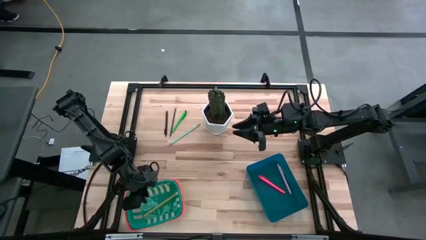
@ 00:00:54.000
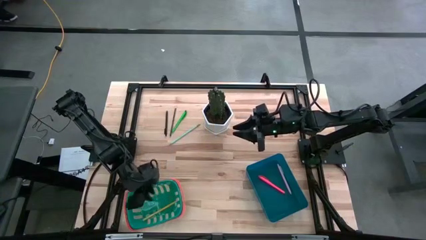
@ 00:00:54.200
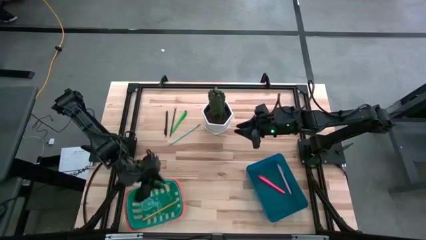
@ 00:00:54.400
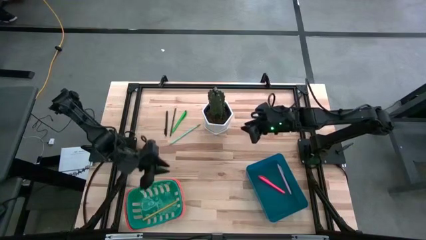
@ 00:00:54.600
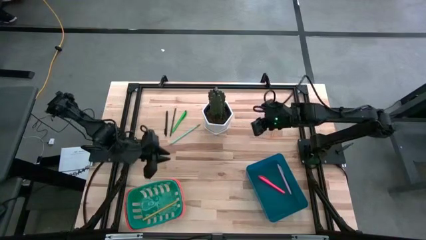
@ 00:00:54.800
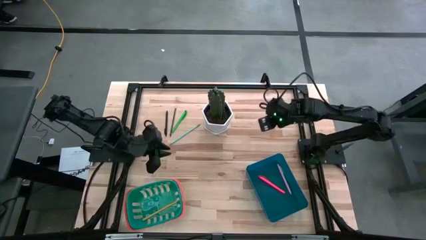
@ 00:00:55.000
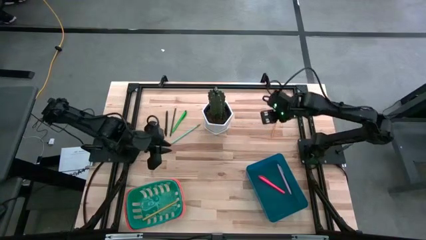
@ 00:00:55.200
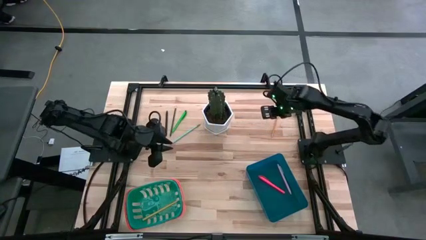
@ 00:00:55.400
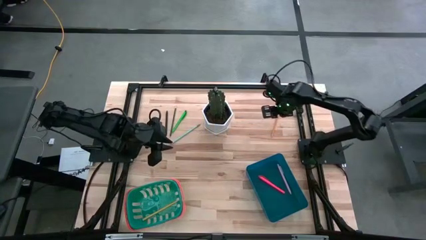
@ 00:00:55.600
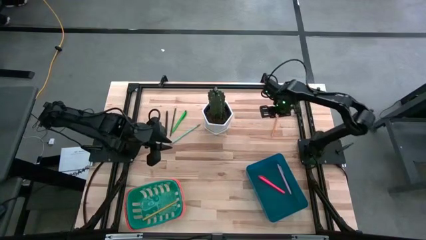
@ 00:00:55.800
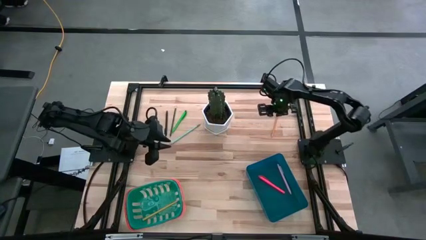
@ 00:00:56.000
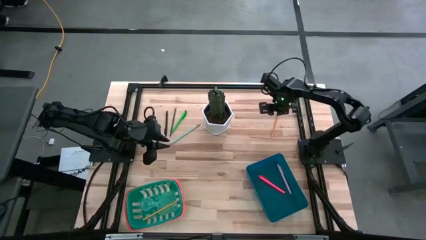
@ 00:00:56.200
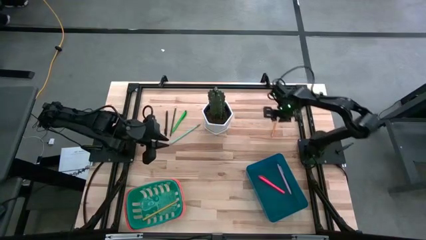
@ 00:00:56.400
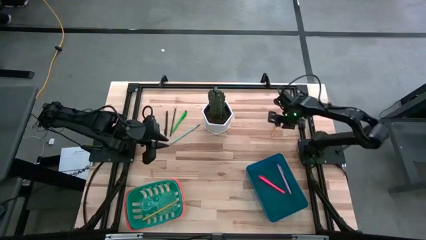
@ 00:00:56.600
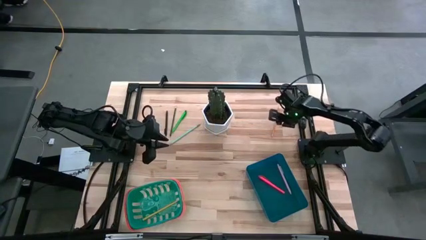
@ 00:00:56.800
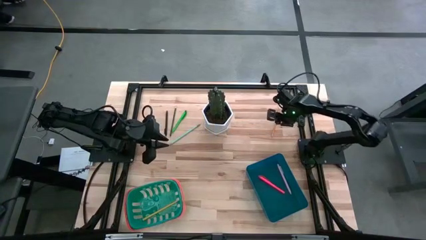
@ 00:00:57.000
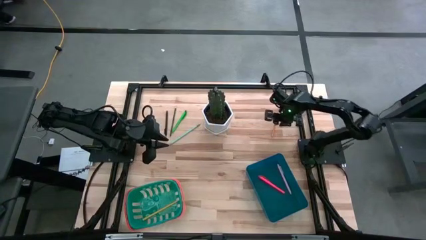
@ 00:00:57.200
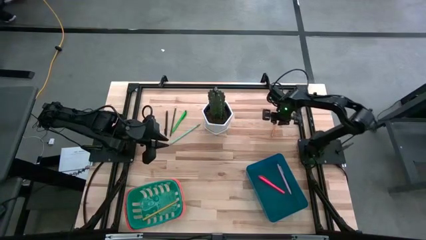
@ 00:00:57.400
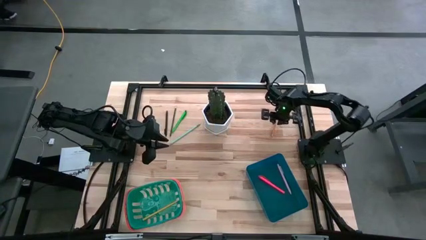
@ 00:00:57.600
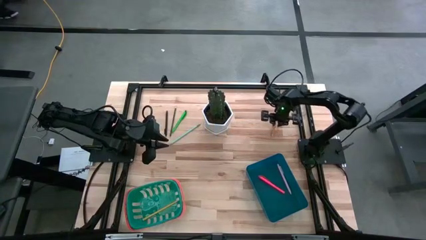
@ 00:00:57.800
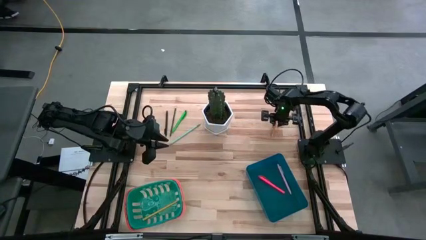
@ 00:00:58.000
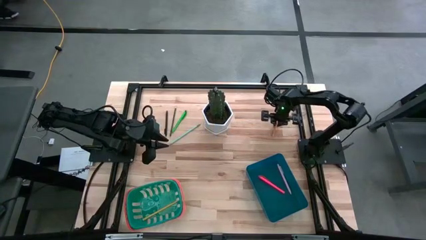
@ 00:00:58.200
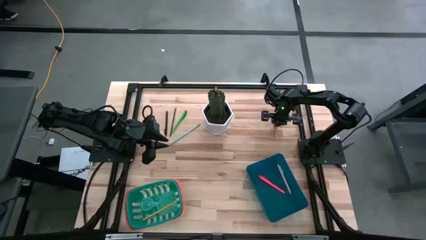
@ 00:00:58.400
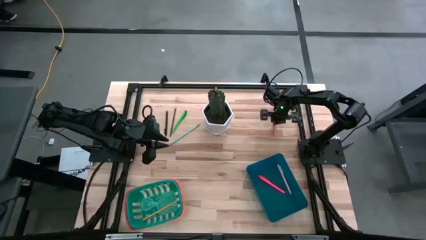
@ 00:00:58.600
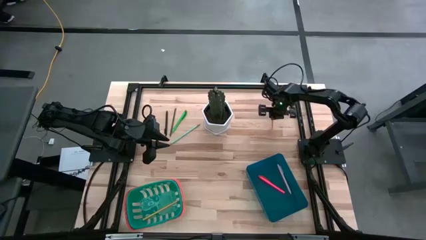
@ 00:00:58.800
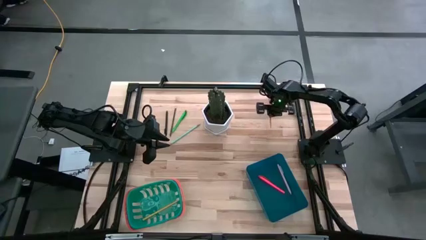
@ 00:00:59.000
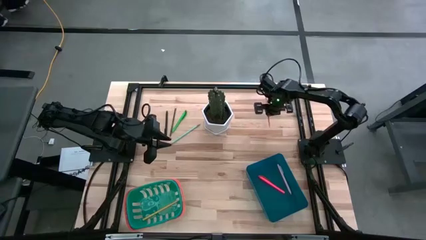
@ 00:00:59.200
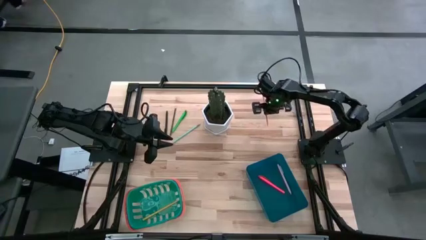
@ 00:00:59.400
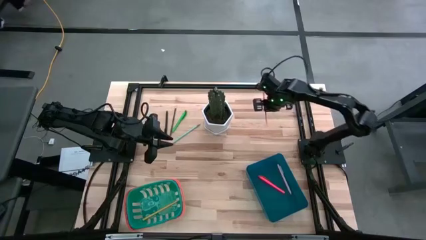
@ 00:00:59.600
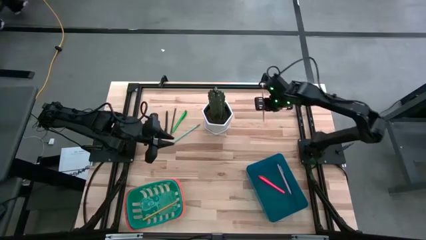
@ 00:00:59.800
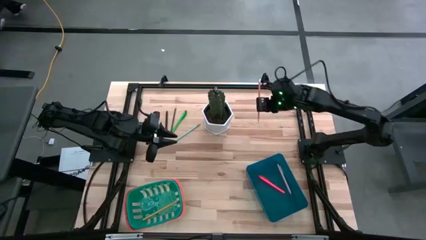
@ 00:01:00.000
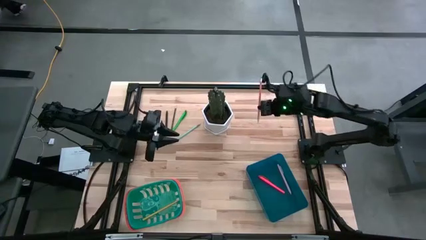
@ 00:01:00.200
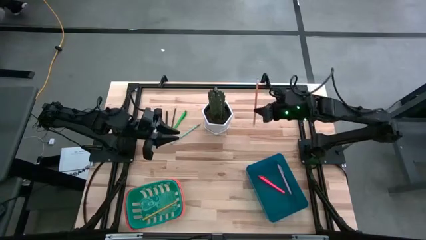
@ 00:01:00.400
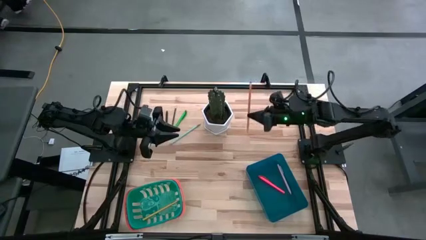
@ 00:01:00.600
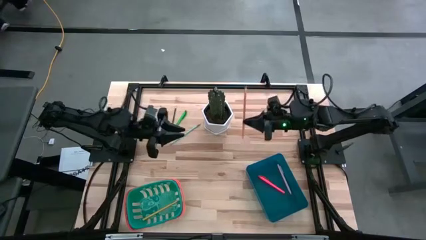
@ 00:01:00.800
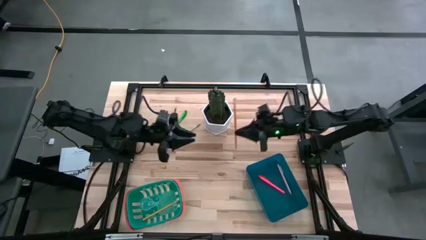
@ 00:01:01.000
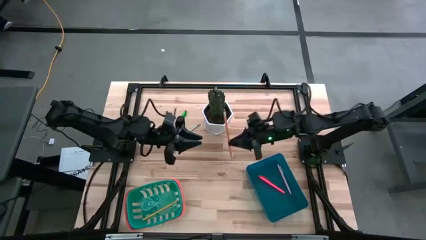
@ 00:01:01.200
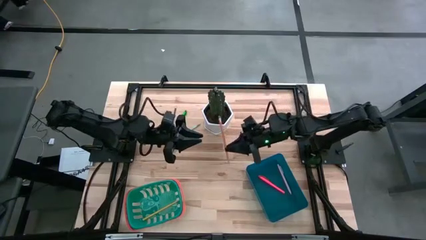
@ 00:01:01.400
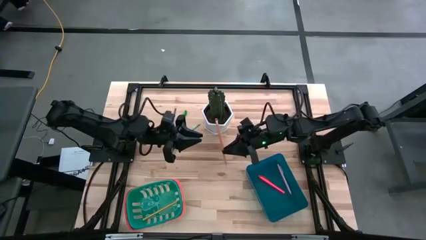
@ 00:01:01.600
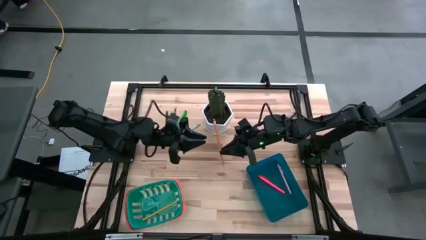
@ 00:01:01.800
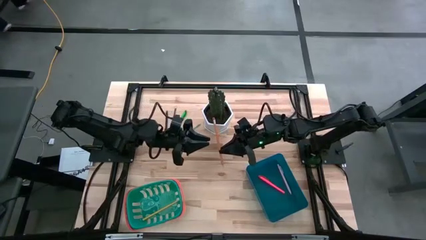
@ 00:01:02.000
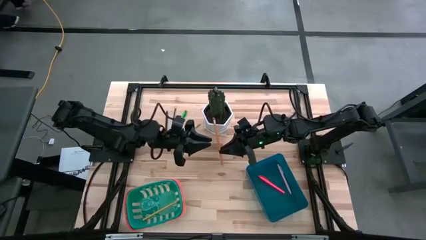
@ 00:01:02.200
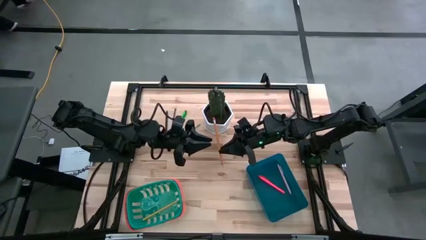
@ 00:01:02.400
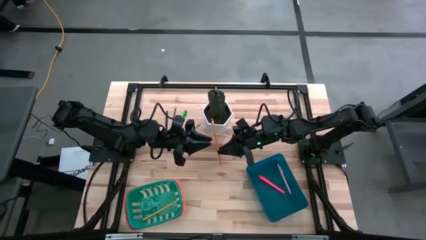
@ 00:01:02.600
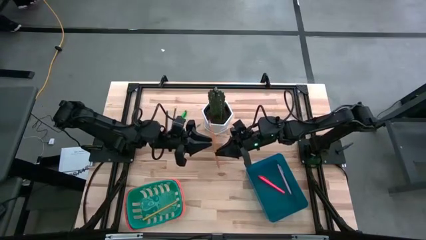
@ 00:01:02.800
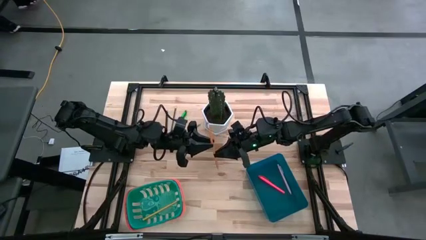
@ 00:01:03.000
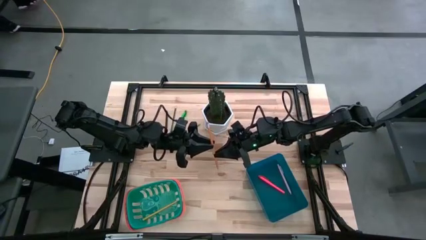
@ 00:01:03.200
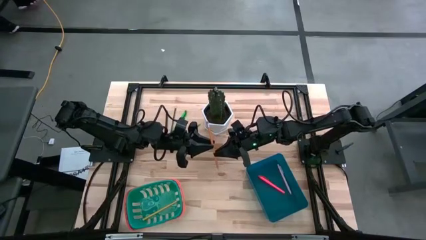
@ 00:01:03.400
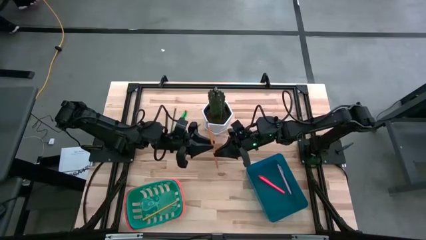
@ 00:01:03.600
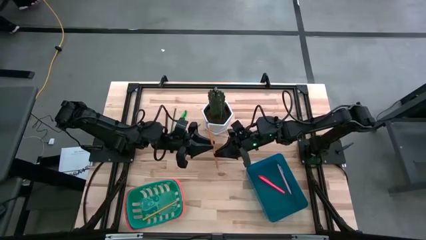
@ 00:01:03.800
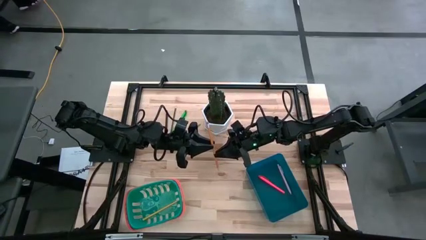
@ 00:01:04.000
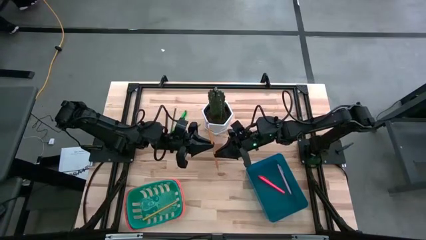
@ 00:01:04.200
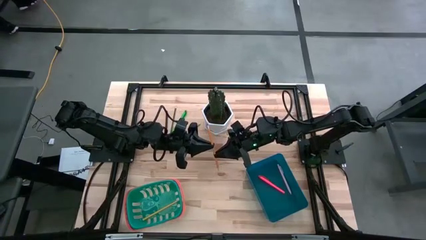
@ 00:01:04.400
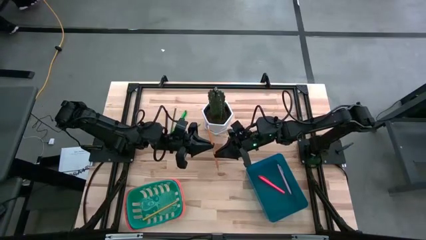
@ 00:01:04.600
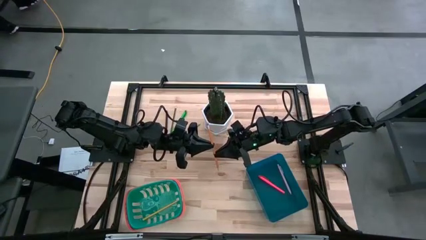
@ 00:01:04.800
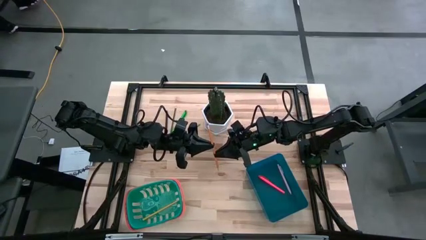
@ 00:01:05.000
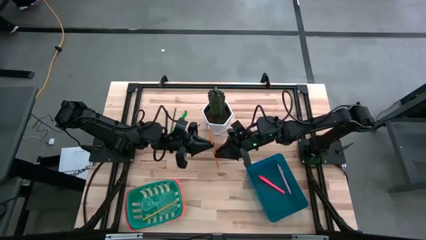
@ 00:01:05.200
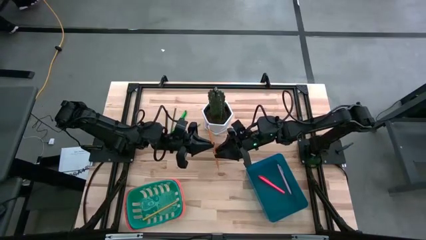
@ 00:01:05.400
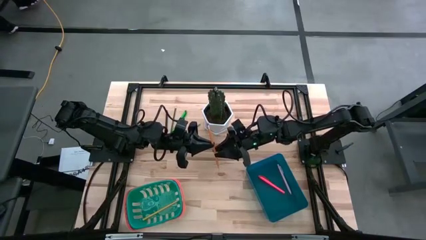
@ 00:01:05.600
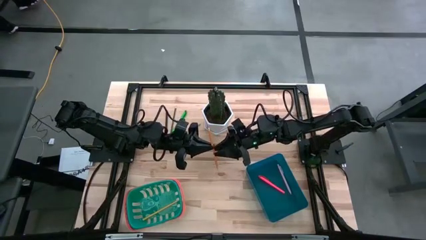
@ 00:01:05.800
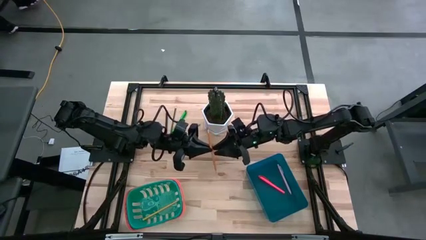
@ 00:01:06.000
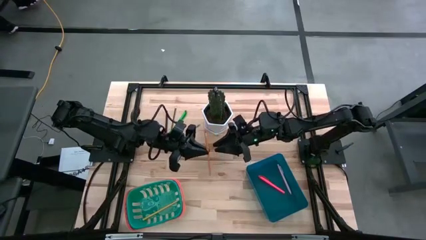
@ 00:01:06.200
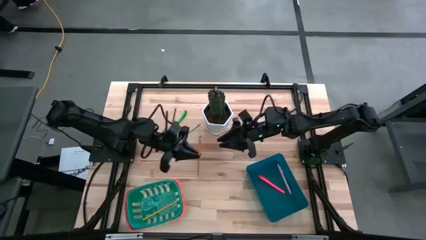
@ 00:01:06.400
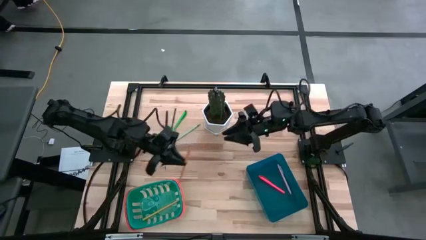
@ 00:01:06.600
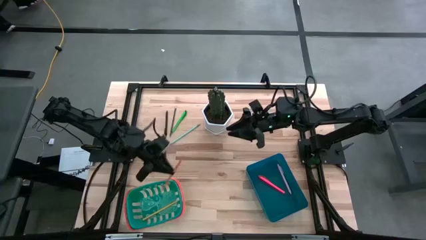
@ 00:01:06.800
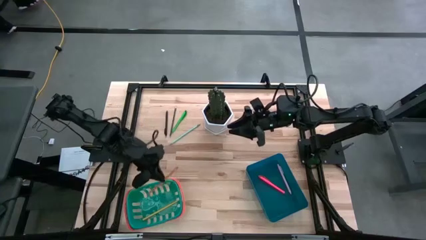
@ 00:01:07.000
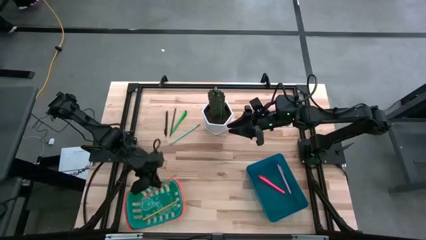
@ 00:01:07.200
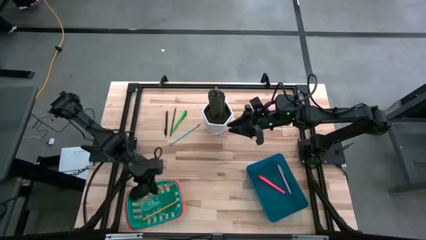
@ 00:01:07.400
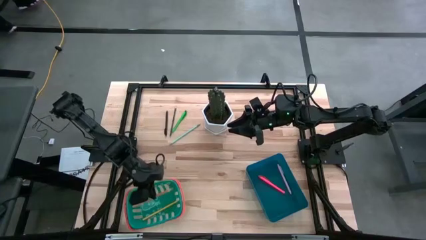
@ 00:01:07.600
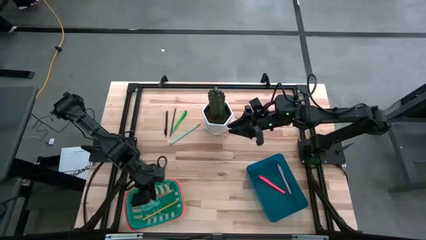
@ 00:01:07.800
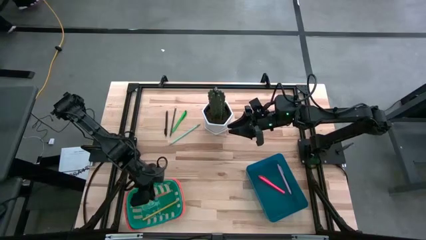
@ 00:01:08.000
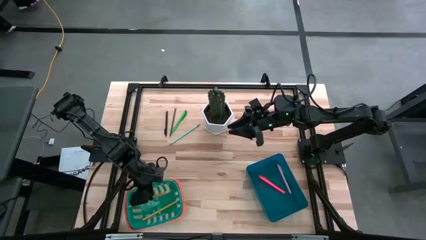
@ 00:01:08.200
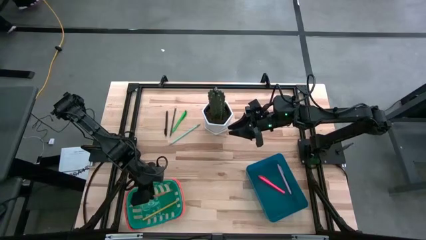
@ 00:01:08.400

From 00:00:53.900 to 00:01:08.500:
Task: Sort pens & pencils
Put the orange pencil into the green bin

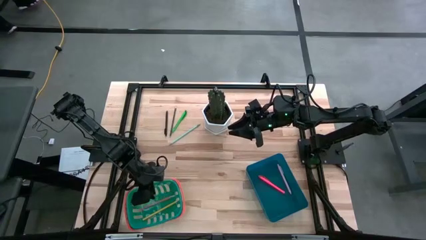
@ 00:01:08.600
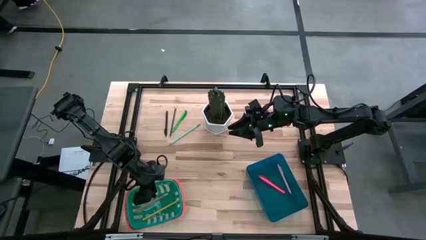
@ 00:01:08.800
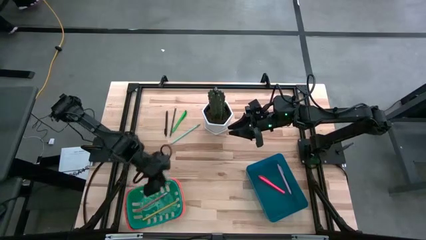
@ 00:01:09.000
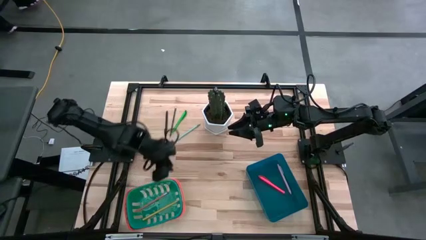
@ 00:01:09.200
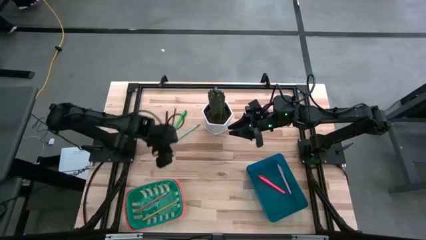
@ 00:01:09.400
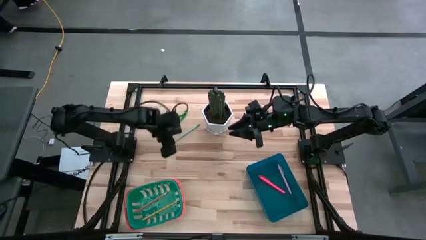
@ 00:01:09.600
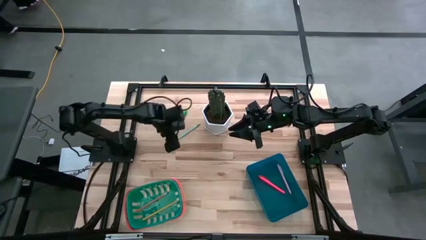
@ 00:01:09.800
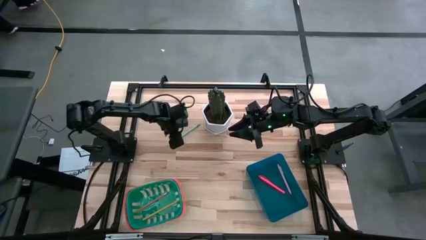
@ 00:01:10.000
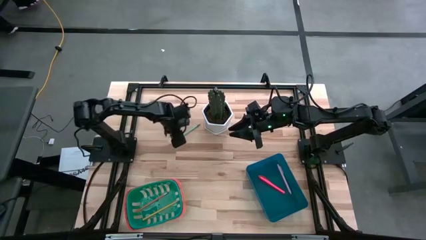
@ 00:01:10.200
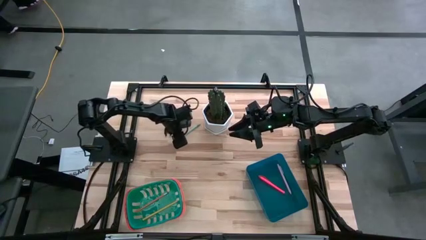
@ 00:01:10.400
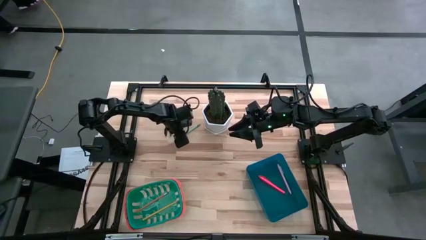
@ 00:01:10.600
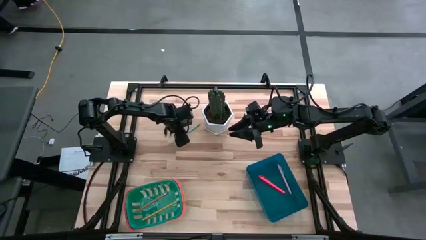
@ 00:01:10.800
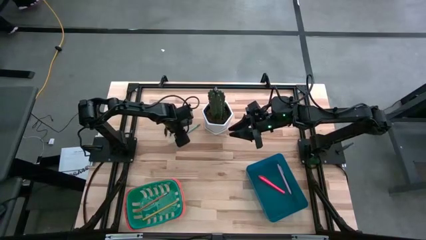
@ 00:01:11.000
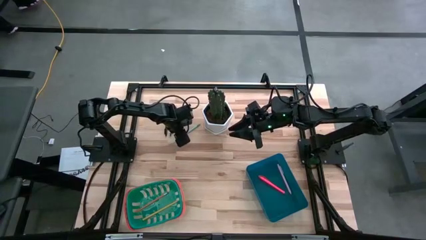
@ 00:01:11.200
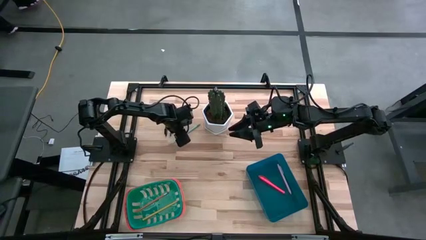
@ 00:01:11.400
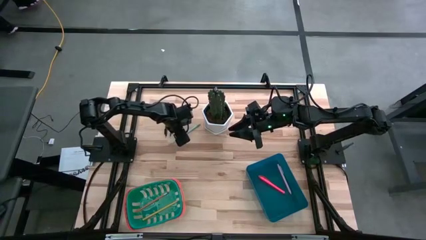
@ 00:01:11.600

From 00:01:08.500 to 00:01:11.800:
Put the light blue pencil into the green bin
